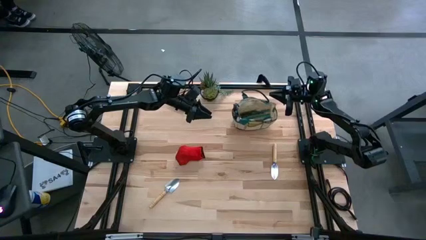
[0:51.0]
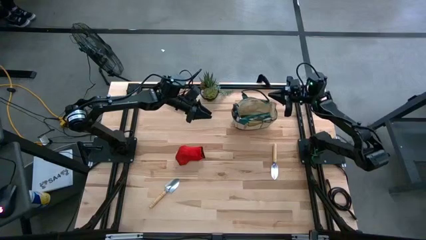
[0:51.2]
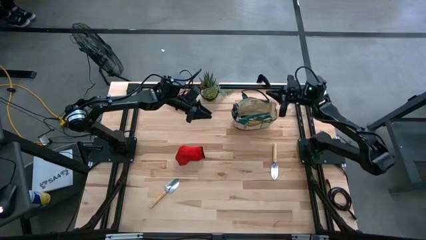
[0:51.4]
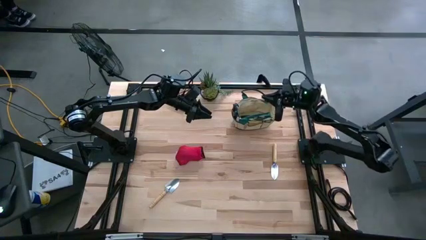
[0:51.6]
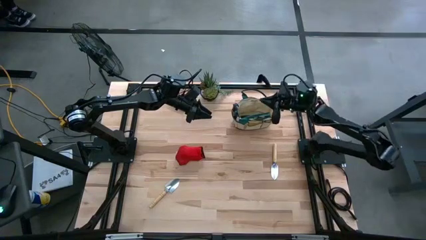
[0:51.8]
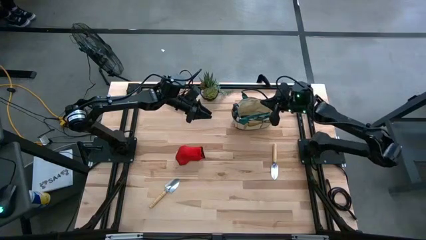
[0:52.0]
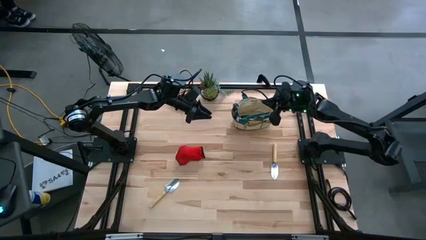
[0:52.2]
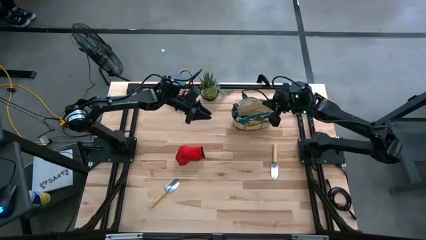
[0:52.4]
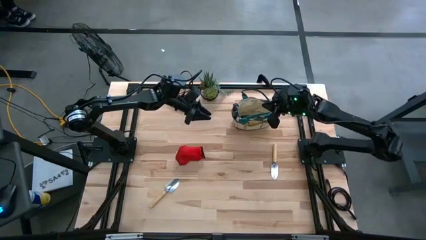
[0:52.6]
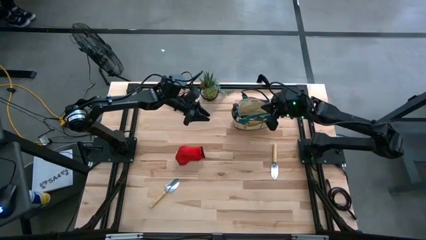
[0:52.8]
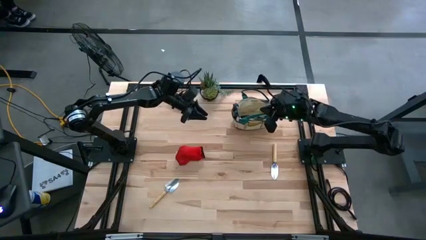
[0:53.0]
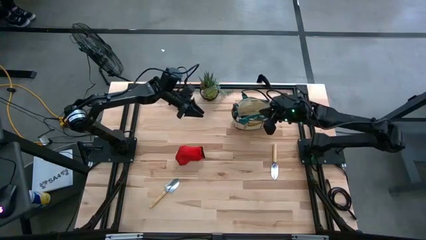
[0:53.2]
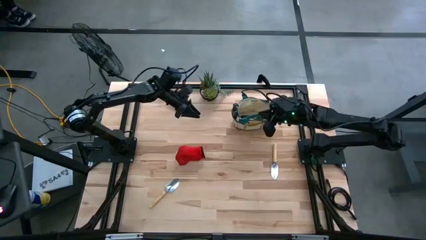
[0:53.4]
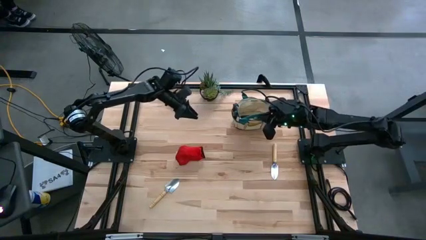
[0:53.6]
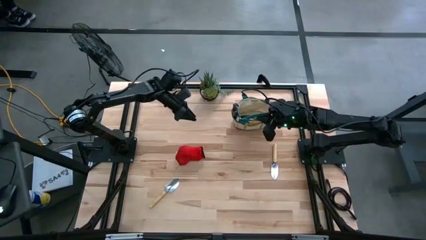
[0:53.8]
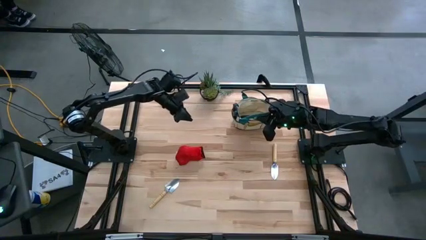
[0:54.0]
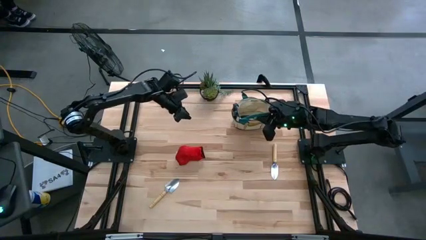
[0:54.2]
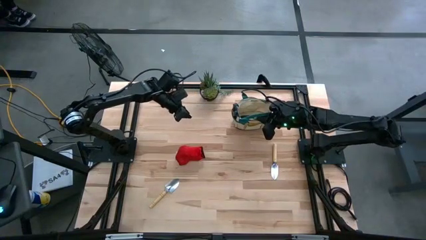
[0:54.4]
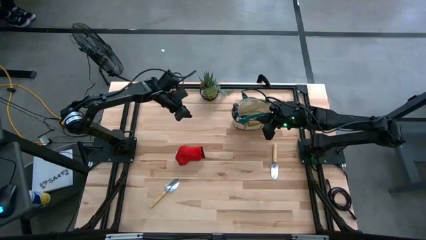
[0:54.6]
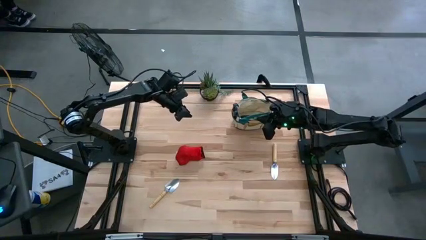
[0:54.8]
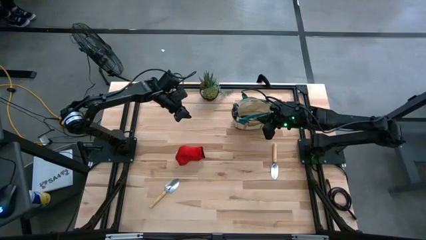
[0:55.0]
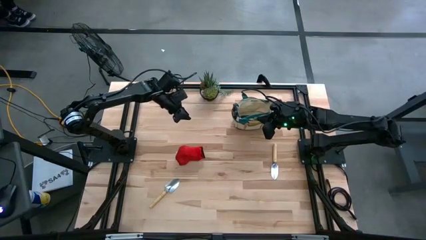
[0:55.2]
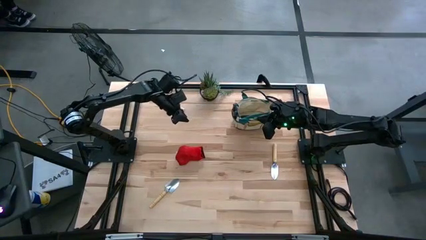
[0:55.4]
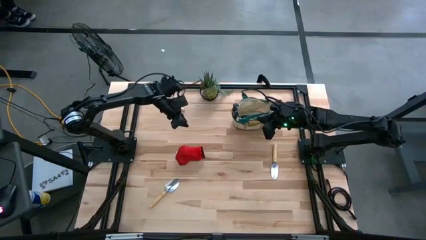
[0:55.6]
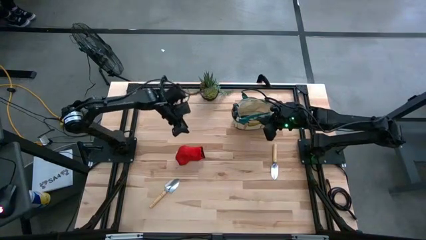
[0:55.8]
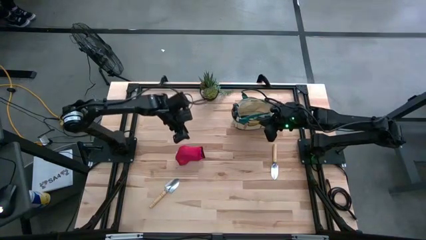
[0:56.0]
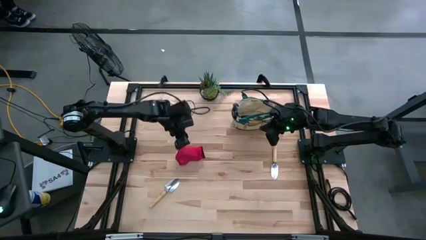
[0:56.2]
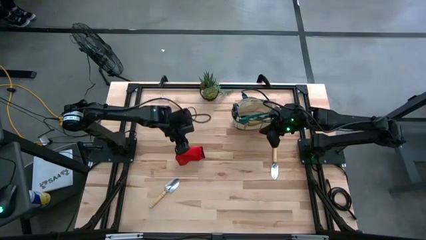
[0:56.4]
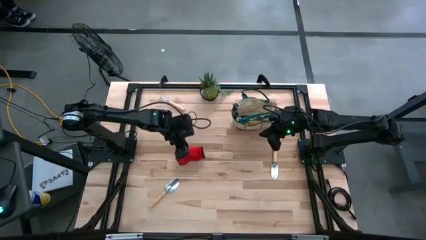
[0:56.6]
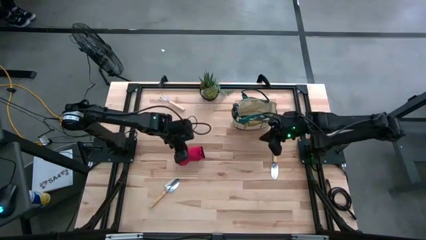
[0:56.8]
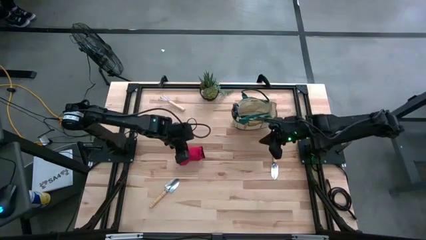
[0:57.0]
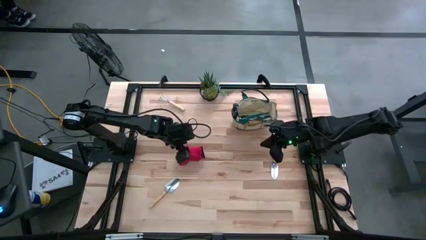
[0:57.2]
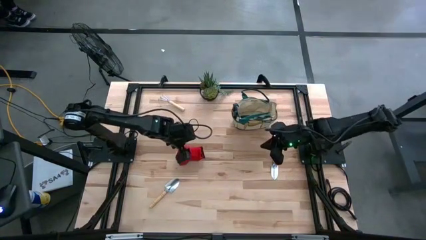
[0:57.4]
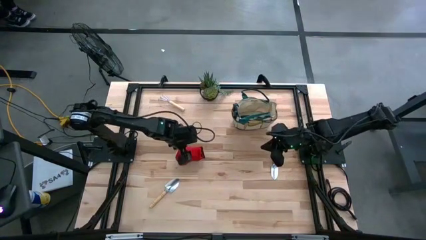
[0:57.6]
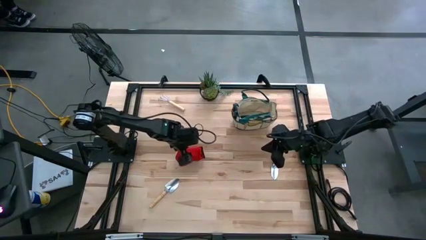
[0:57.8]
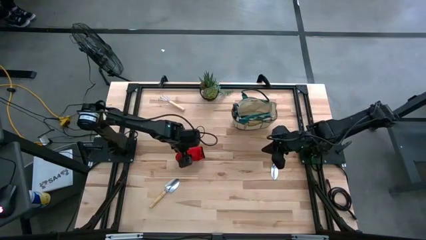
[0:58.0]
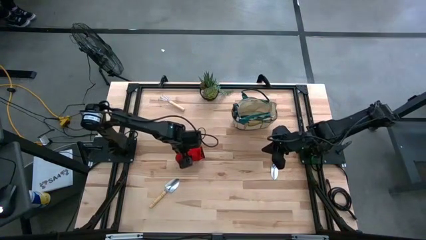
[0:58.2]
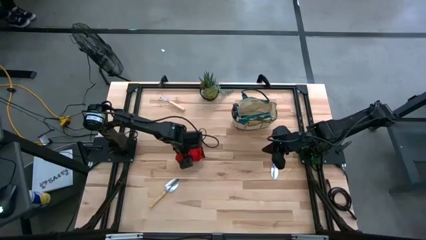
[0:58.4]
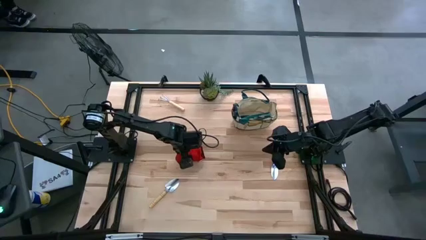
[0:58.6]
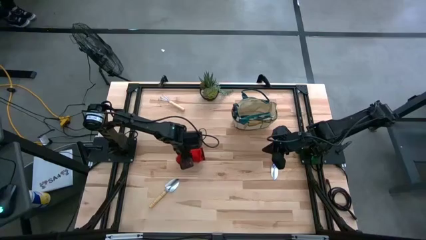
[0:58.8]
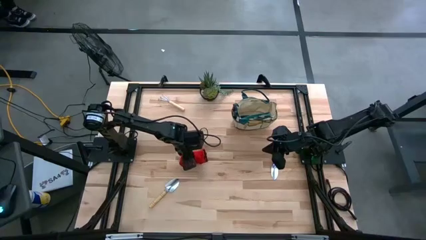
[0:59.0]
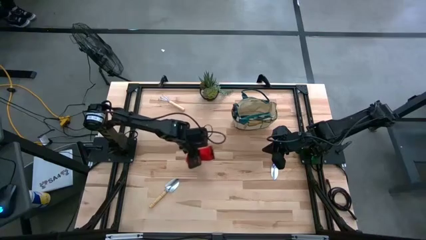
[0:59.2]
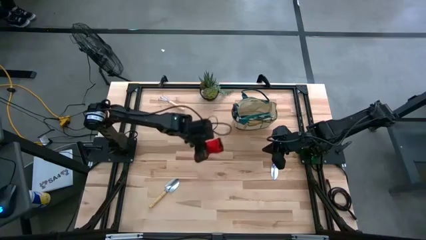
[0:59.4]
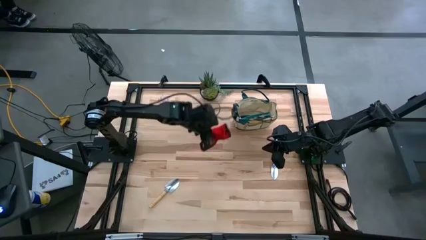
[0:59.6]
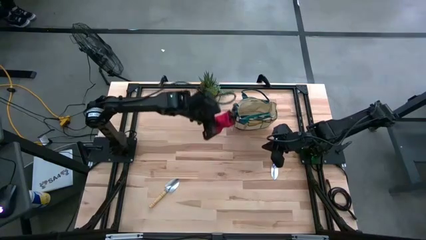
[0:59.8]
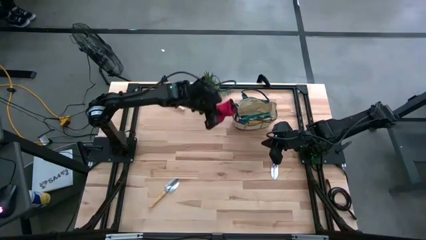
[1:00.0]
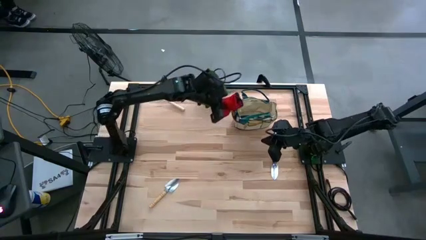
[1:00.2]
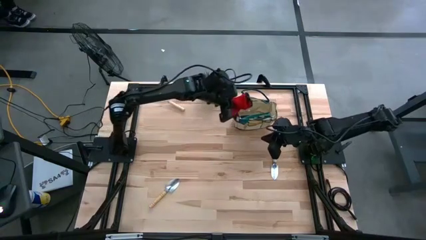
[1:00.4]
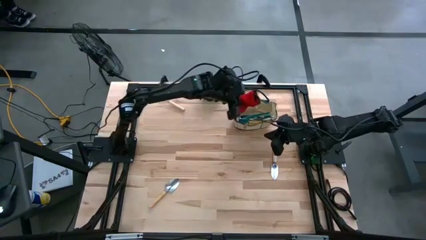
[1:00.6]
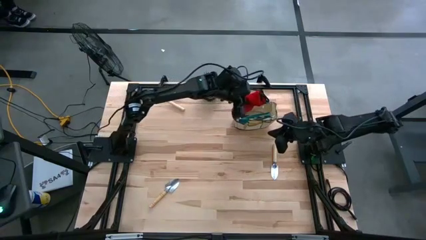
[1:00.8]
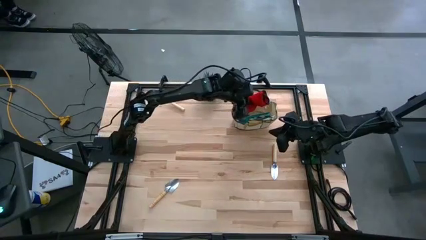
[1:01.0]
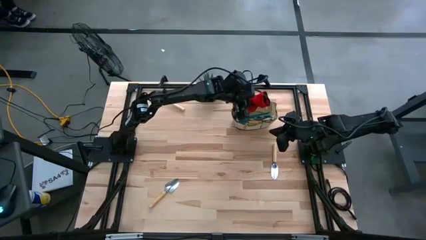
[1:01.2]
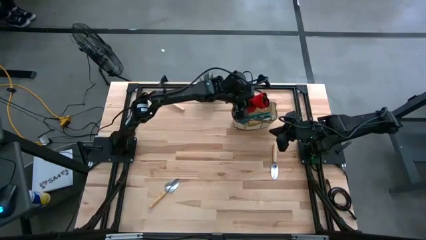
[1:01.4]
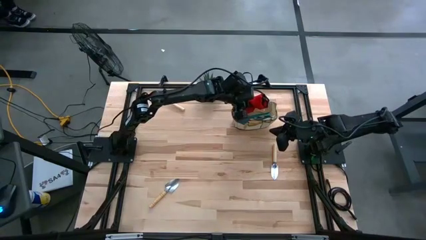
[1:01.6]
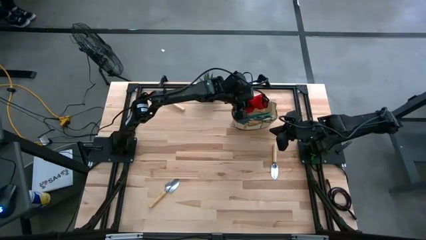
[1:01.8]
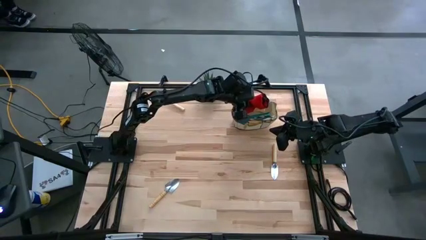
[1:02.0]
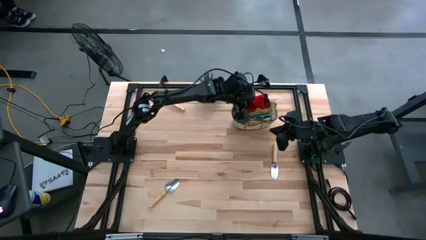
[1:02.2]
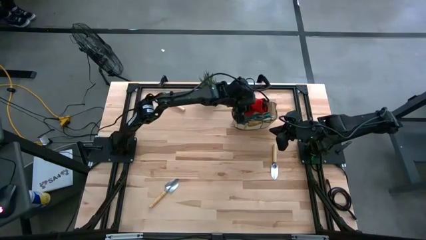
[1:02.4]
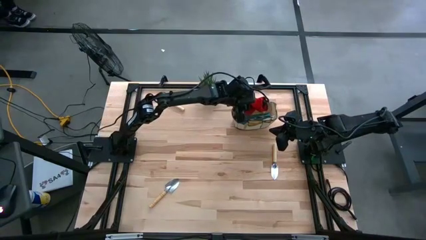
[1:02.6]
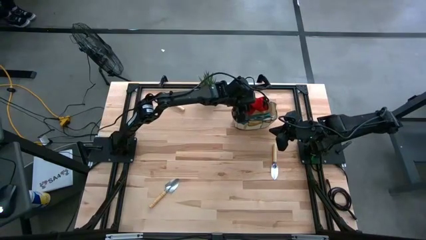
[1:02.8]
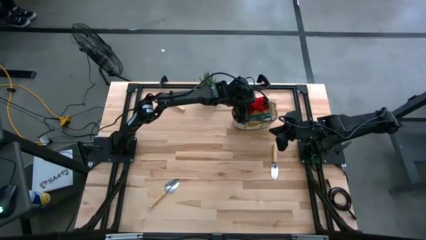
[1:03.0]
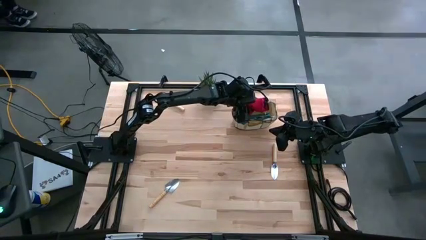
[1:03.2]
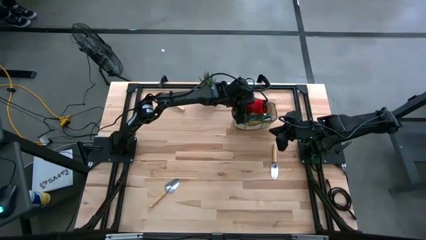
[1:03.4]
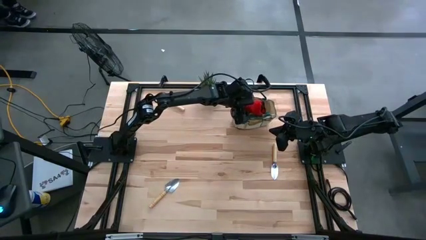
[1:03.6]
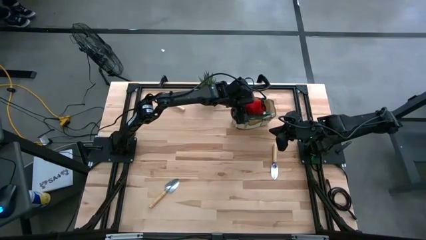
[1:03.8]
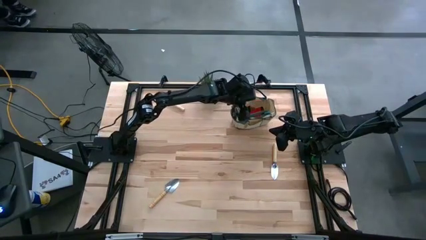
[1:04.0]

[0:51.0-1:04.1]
Task: Pick & Place Garden tools in Gardening bag
Put the red gloves into the light brown gardening bag

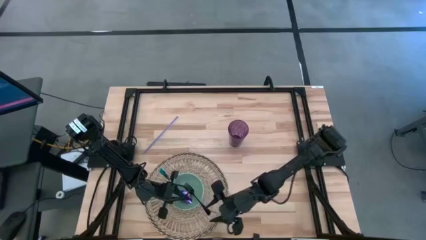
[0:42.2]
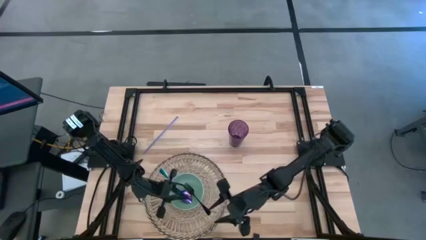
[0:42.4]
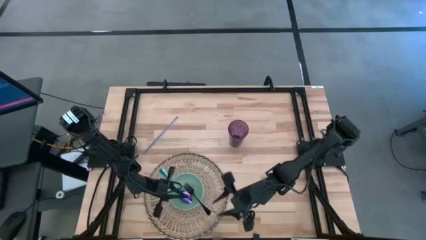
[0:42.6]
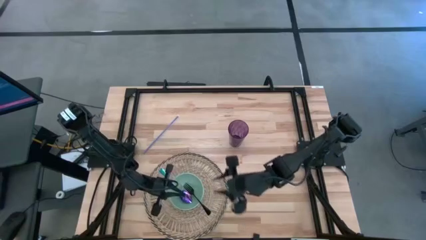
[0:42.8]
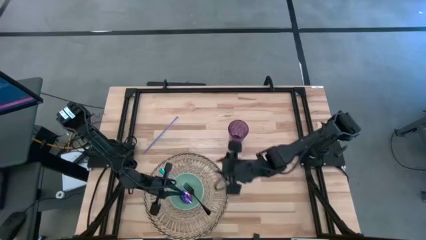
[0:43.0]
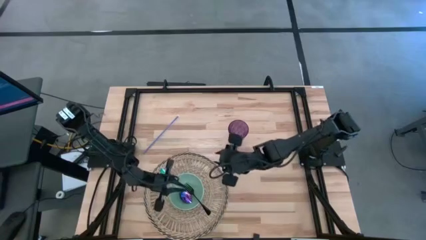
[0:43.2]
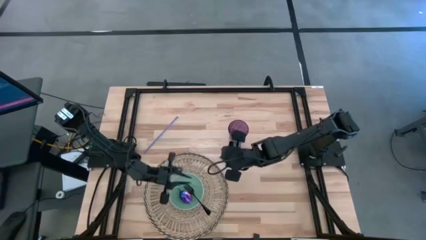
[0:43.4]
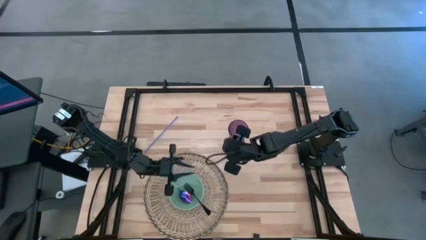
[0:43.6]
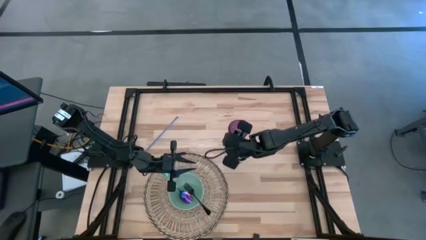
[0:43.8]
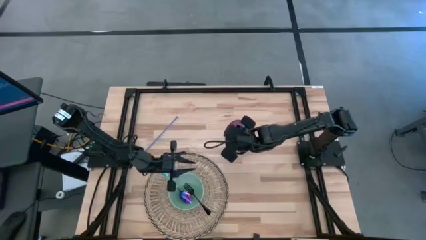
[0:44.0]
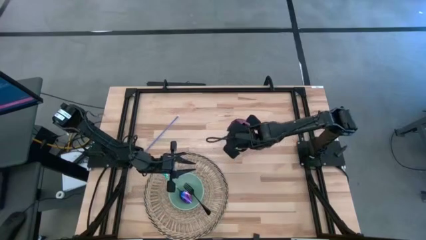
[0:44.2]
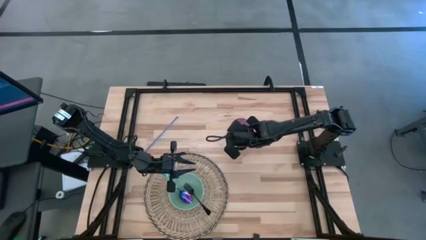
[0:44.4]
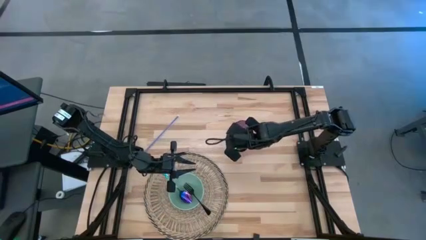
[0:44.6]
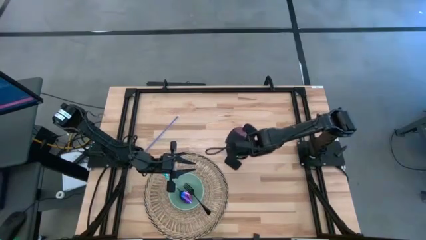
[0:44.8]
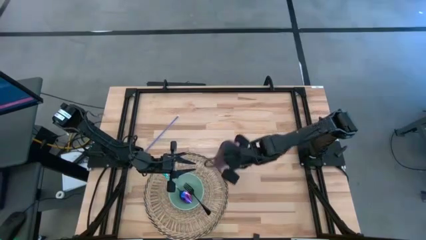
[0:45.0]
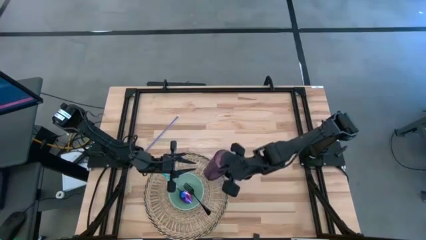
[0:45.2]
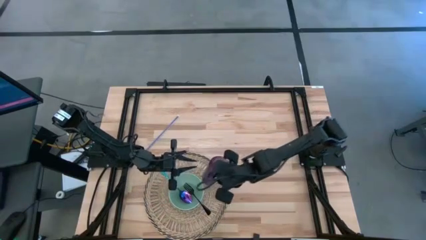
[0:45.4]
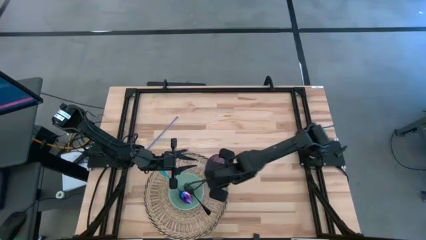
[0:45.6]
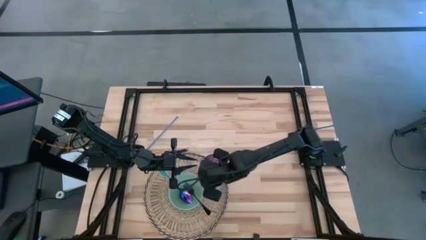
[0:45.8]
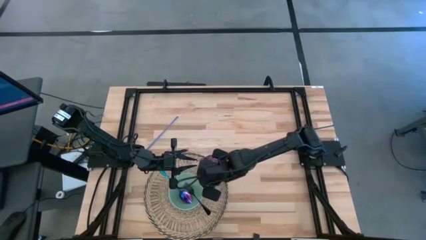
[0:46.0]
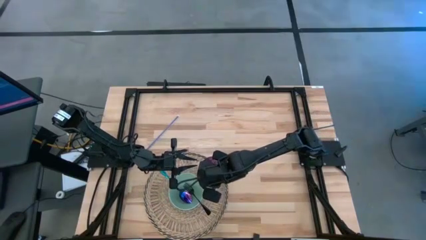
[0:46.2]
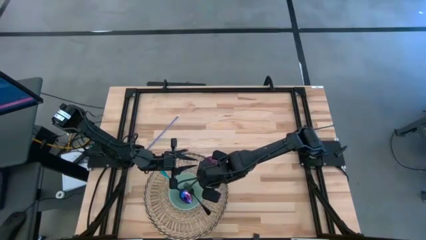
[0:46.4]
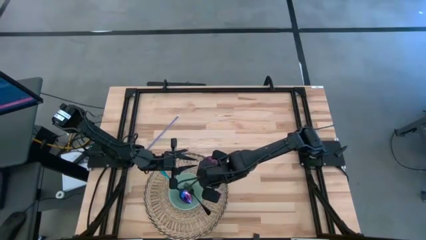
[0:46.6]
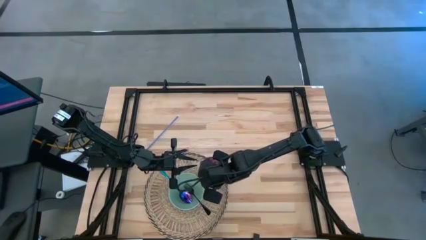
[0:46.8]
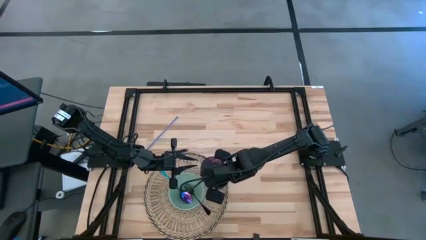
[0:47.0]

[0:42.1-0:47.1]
Task: Pick & Place Utensil
Put the violet cup on the brown mat to the top right of the green bowl
